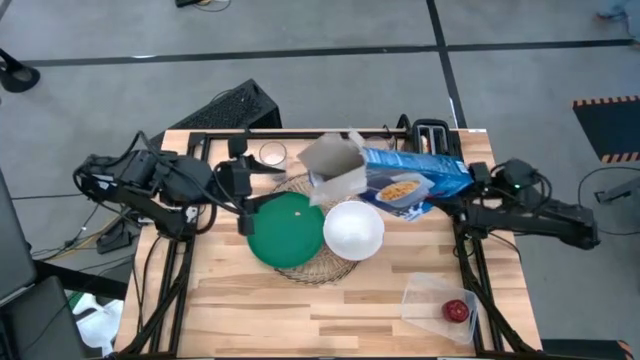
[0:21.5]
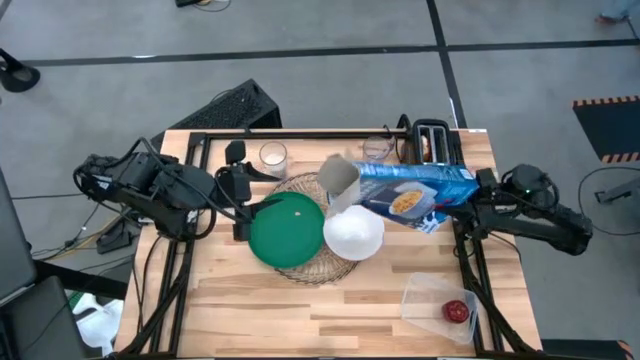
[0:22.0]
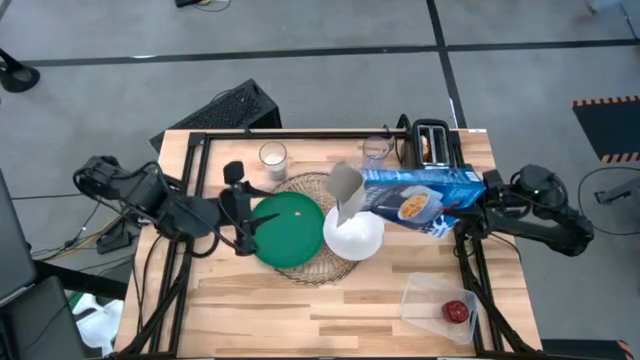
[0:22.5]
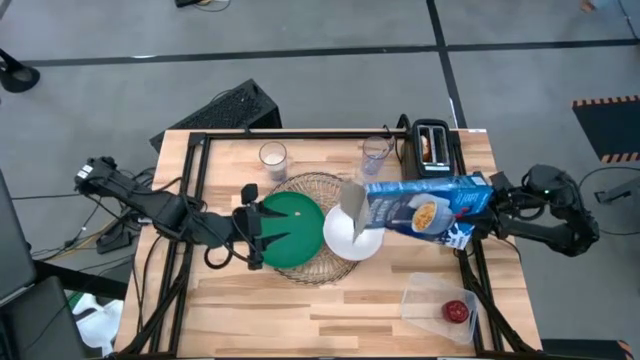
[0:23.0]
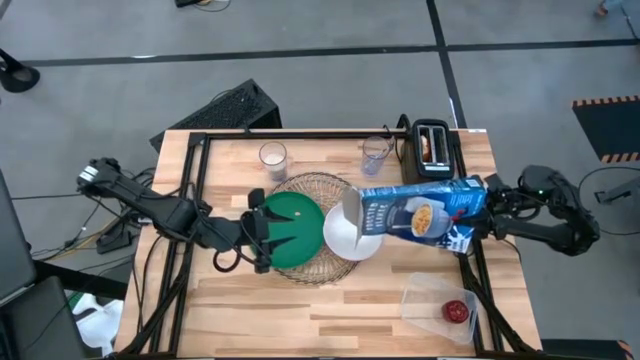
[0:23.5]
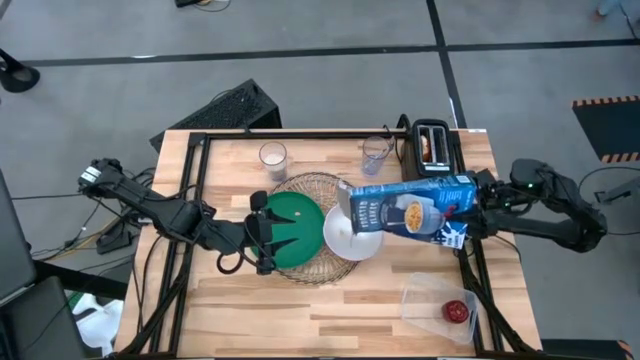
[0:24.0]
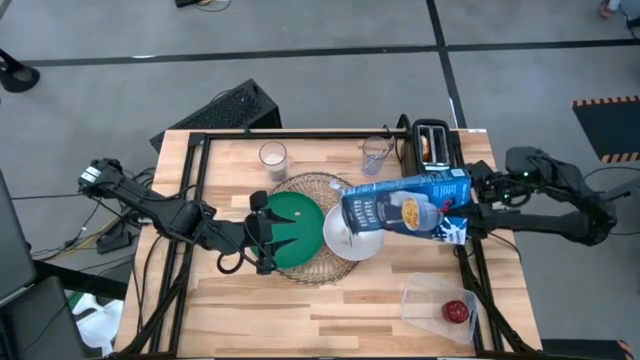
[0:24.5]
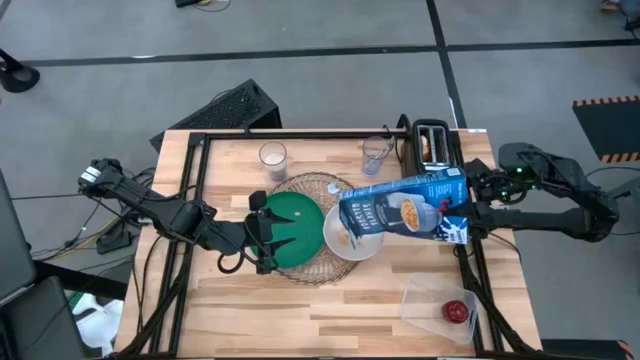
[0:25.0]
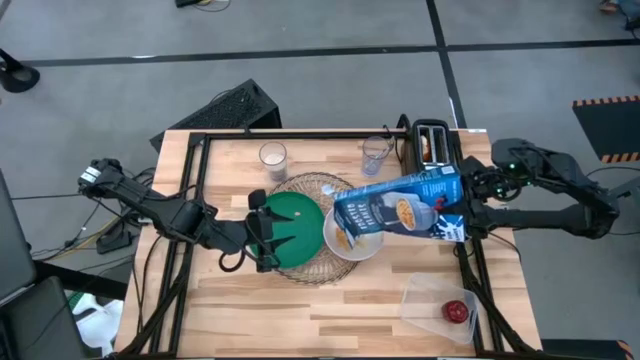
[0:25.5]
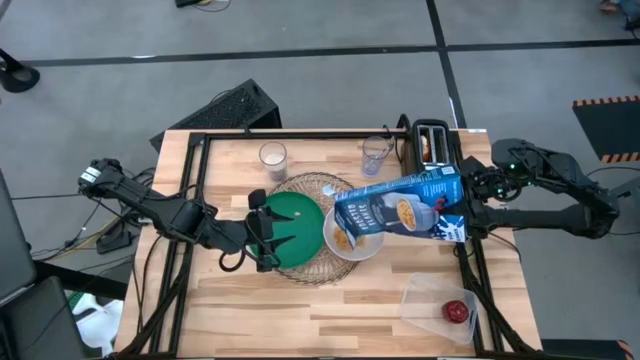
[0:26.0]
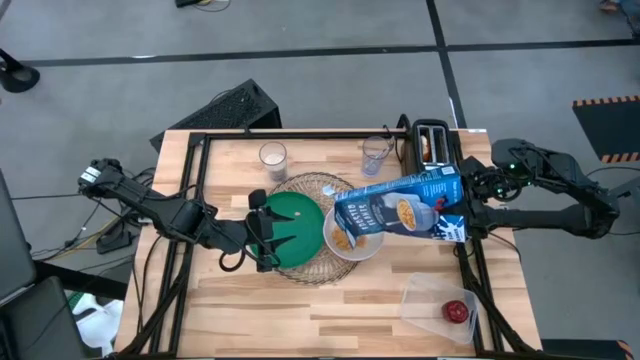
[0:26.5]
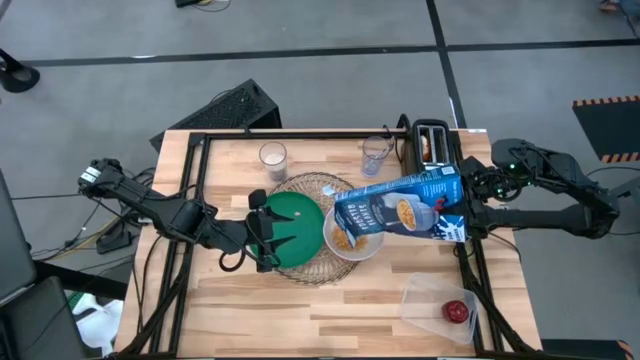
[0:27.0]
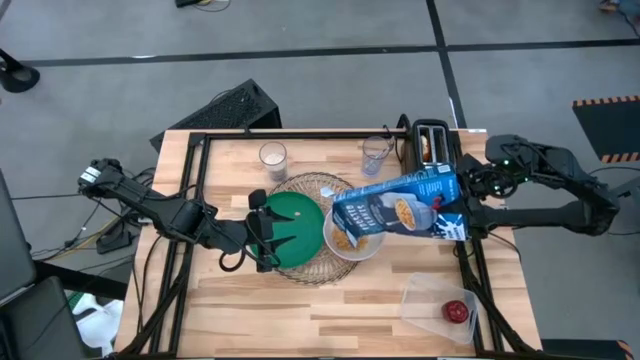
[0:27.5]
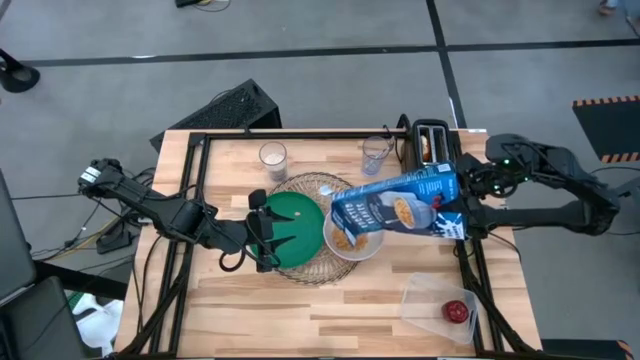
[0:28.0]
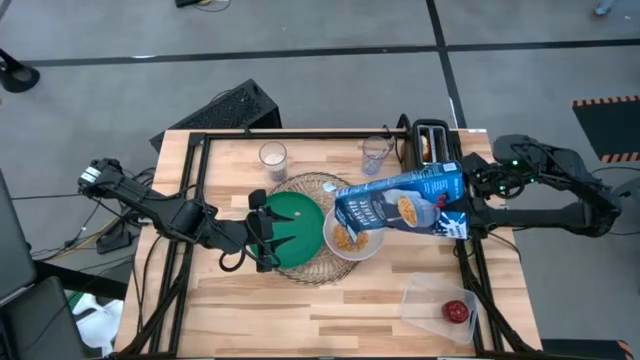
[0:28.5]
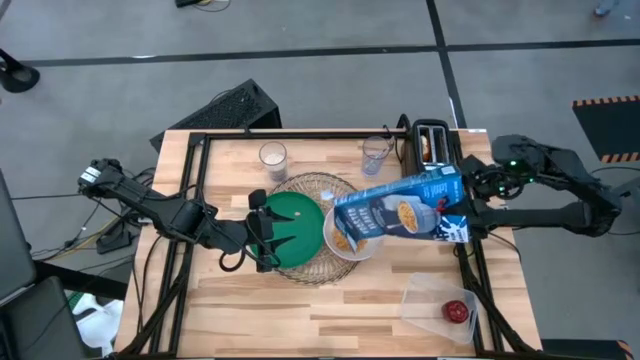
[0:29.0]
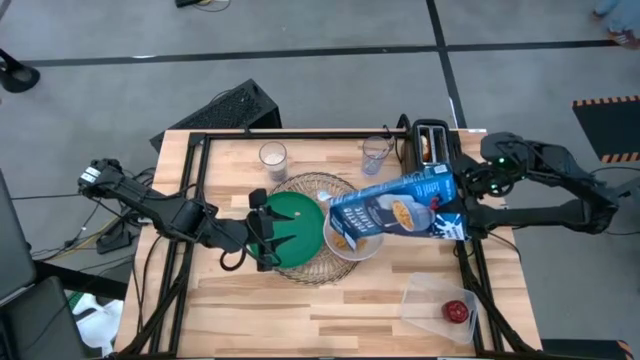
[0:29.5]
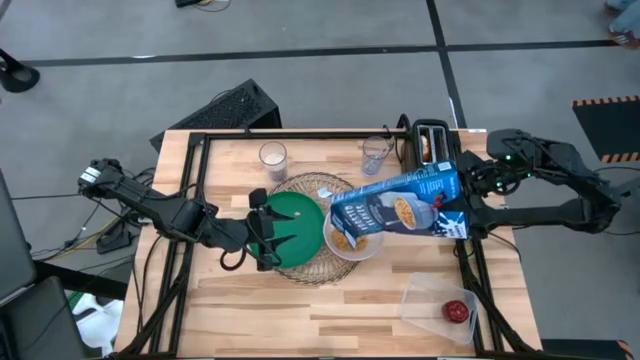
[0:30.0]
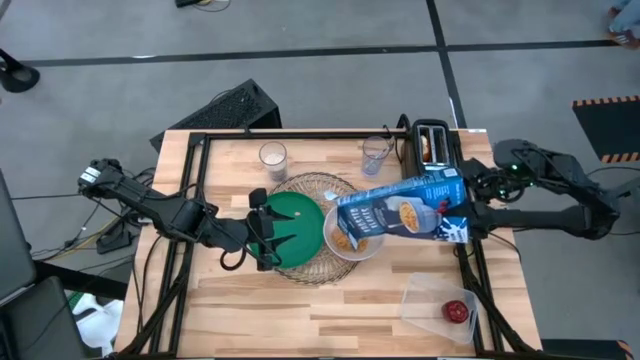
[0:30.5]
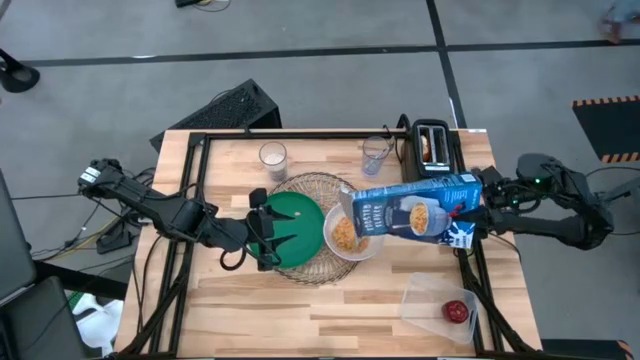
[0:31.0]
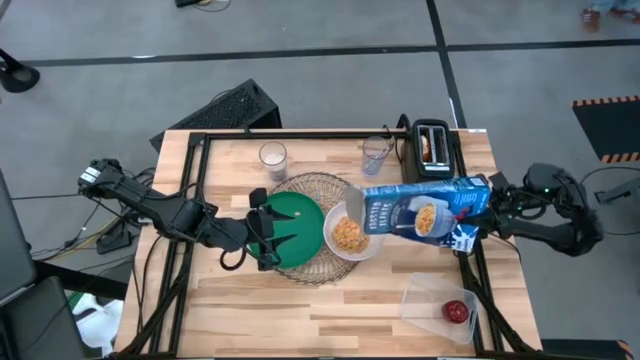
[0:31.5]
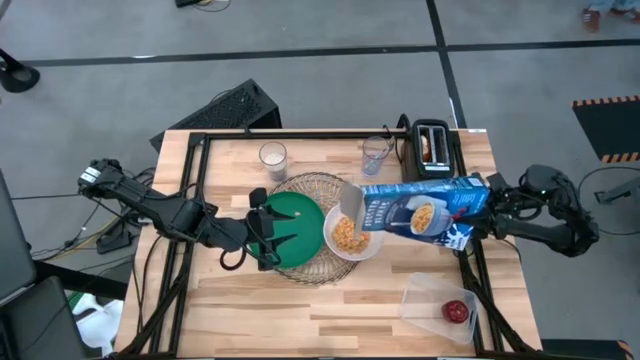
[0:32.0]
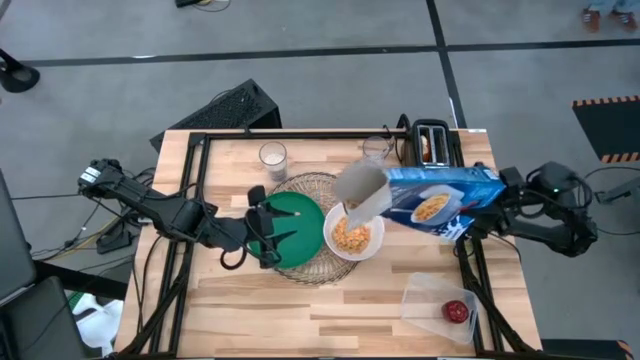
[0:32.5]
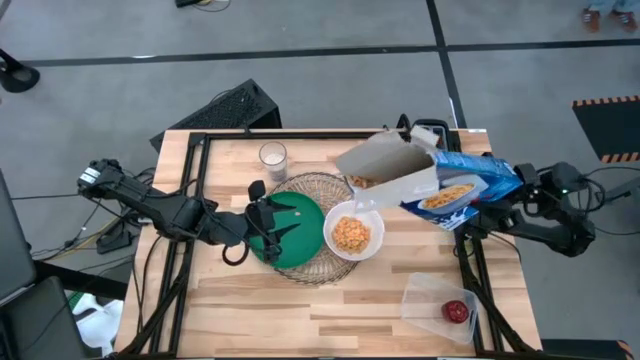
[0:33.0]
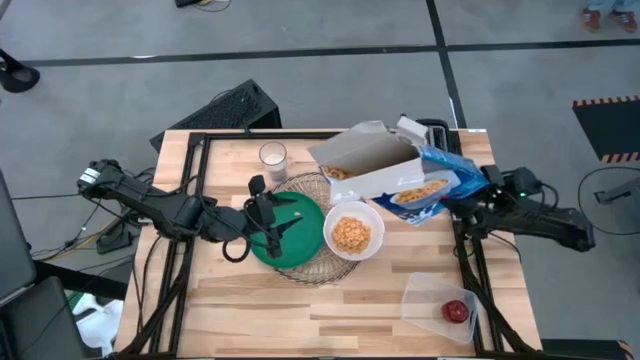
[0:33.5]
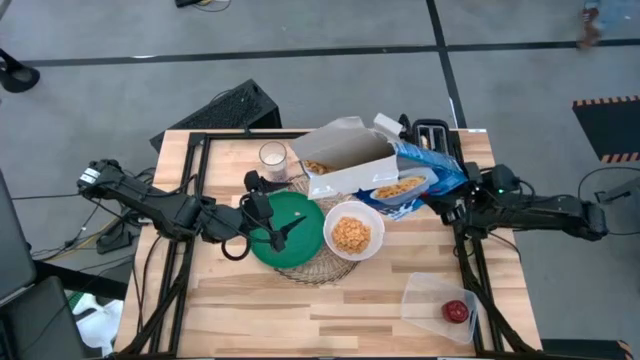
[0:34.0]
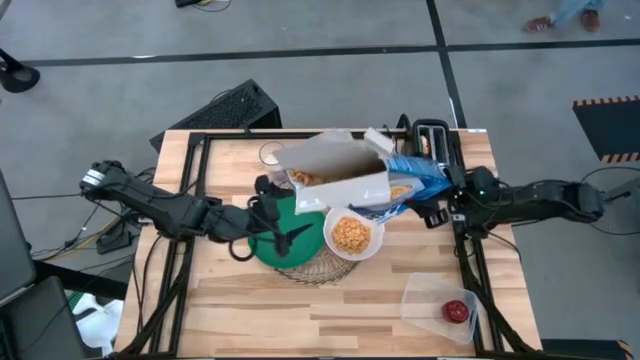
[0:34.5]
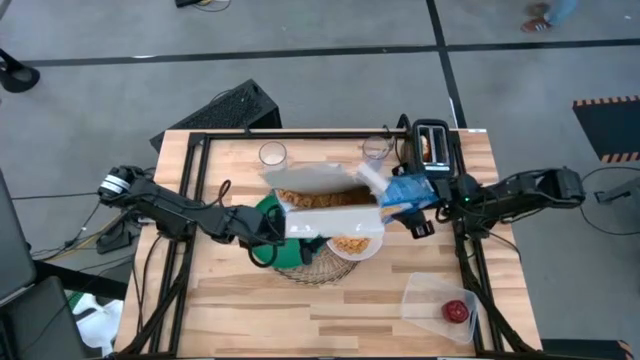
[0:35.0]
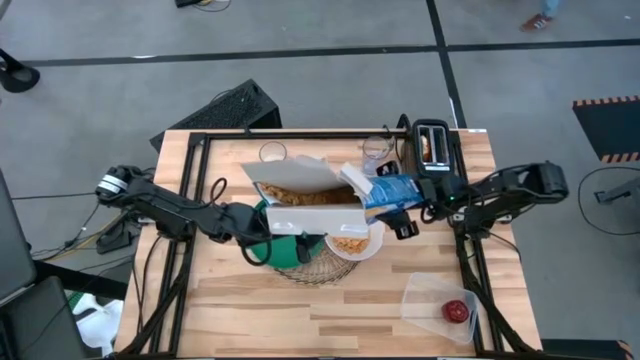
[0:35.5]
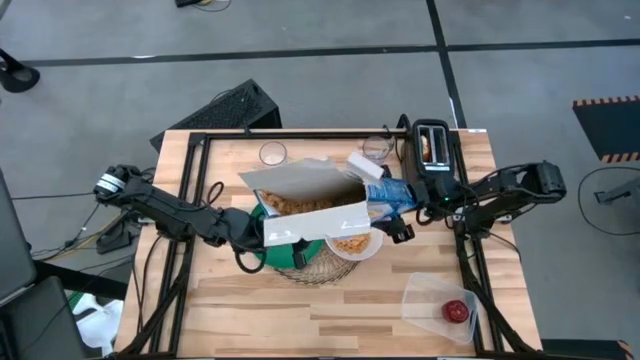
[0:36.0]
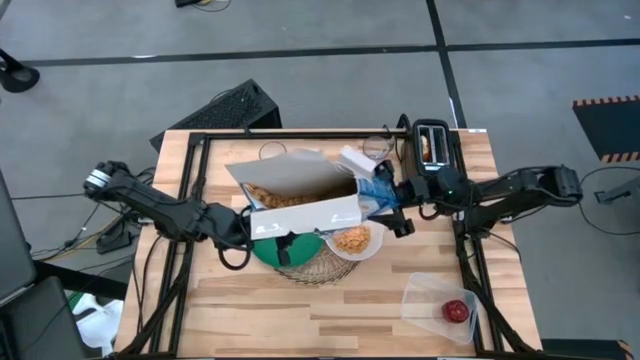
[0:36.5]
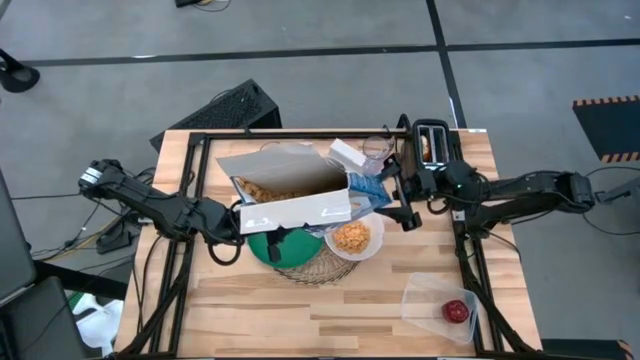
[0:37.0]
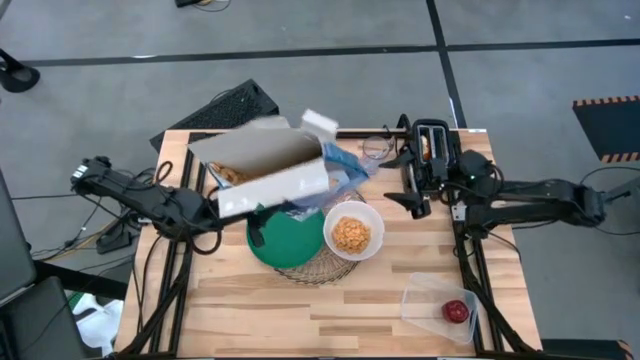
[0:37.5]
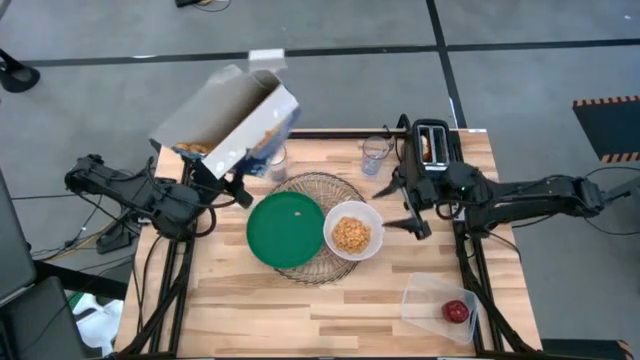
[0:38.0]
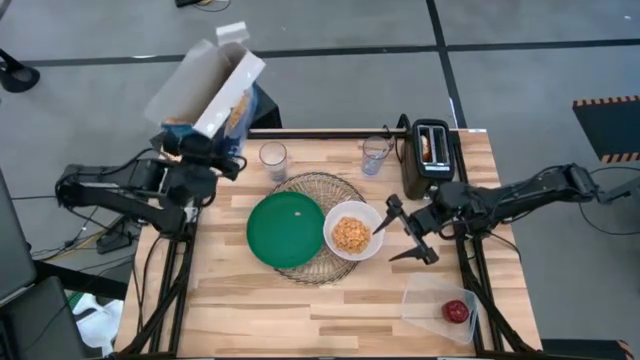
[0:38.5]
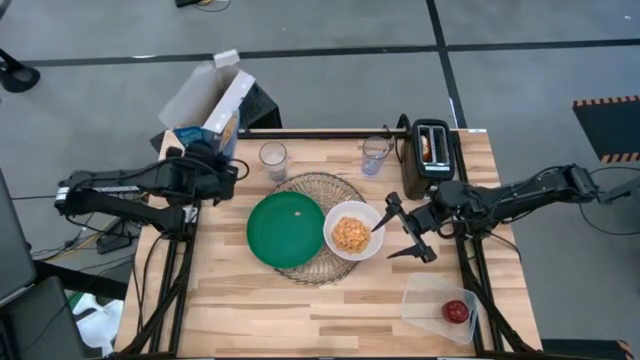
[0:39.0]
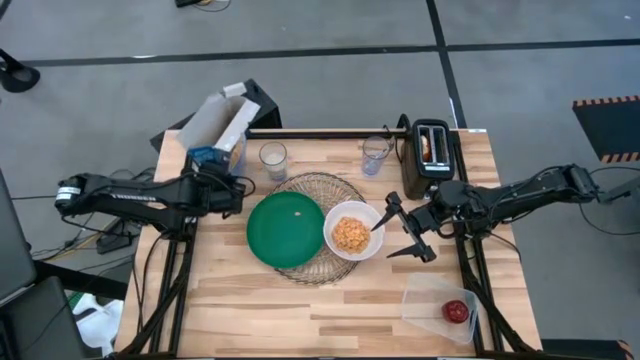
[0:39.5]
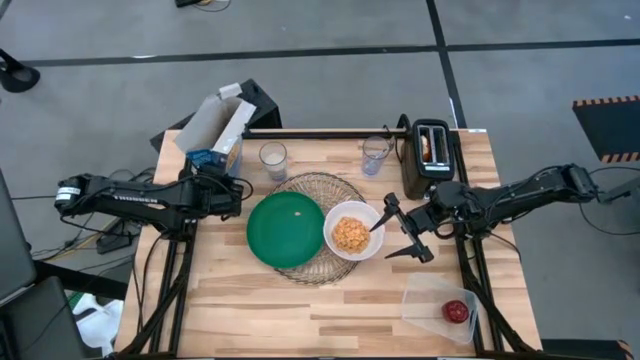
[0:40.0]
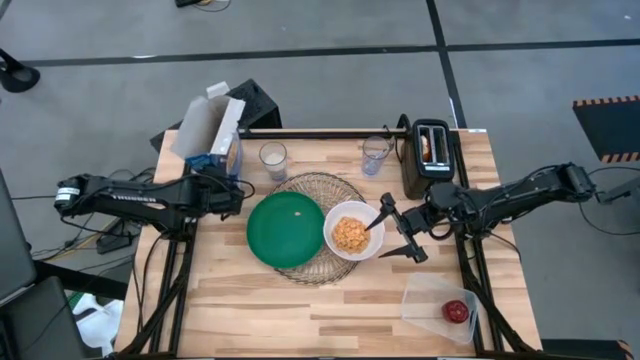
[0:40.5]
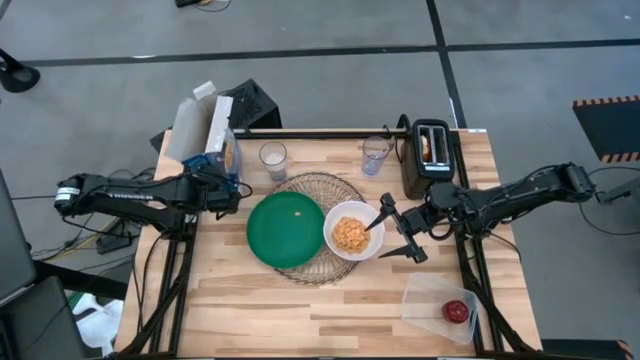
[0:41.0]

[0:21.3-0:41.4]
Task: Arrange a breakfast setting
Pour the cereal into the white bowl
